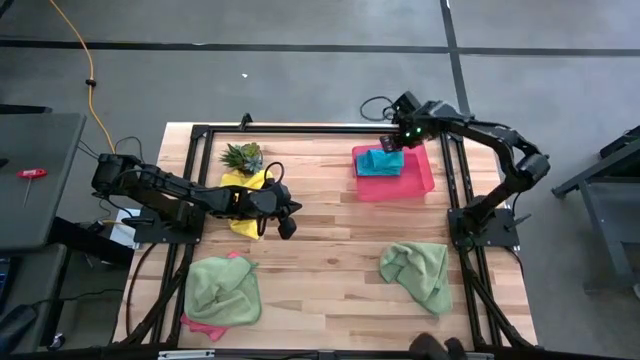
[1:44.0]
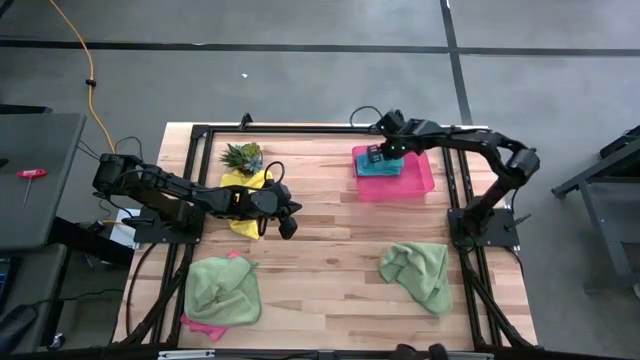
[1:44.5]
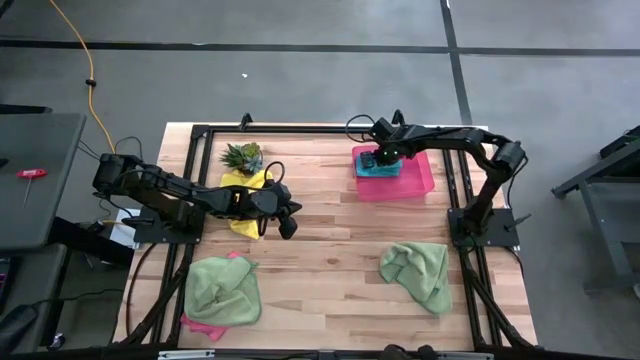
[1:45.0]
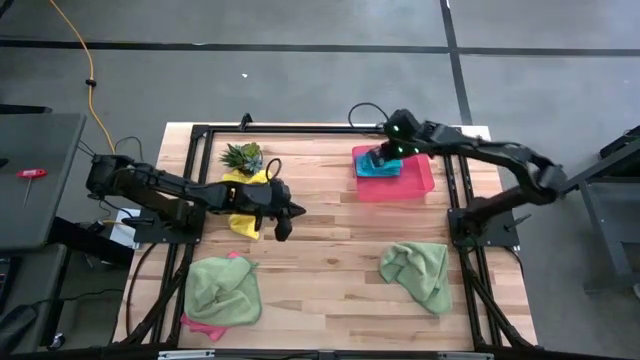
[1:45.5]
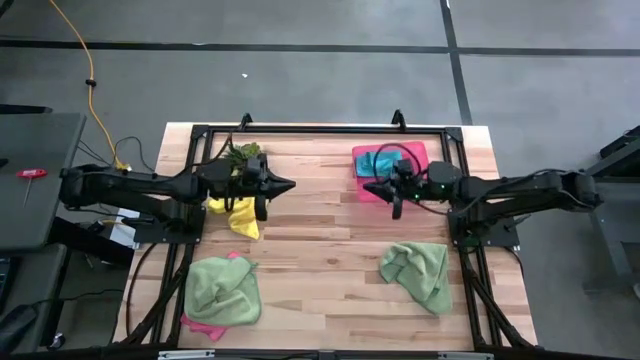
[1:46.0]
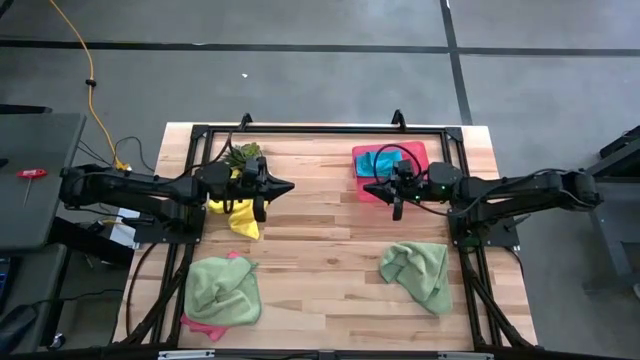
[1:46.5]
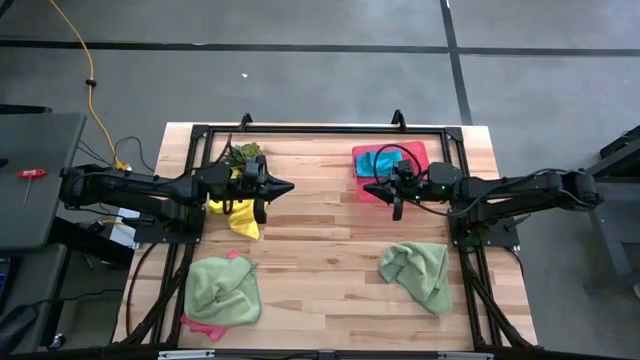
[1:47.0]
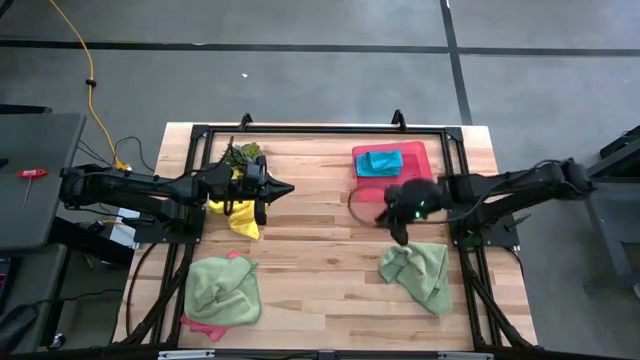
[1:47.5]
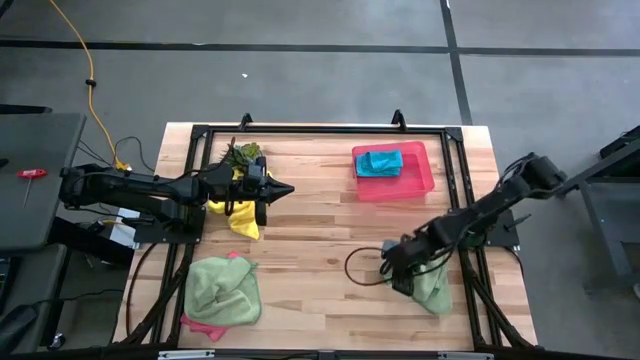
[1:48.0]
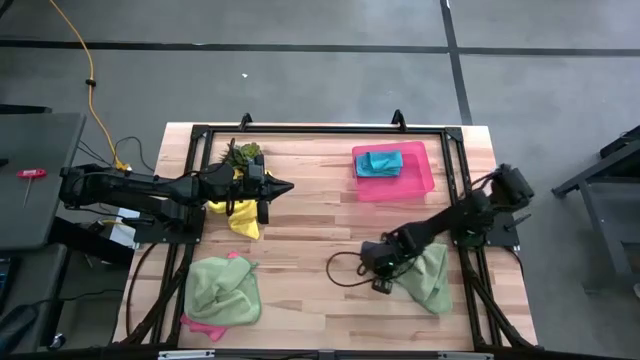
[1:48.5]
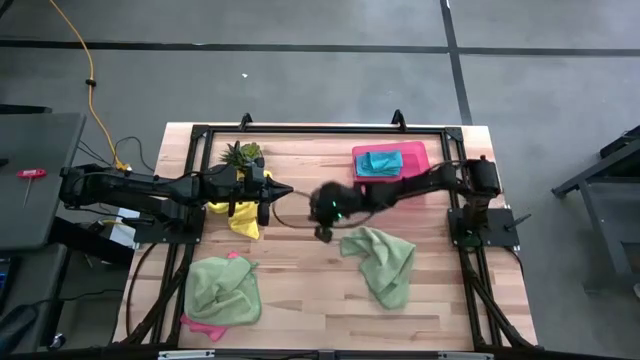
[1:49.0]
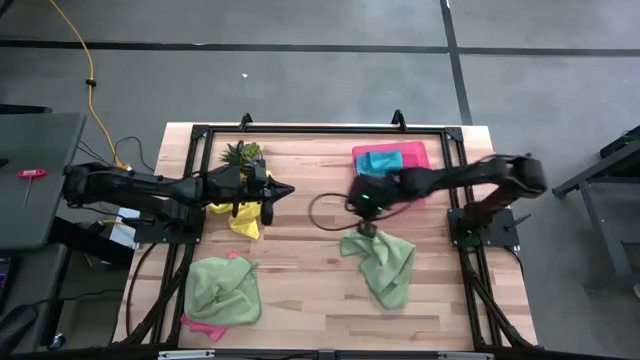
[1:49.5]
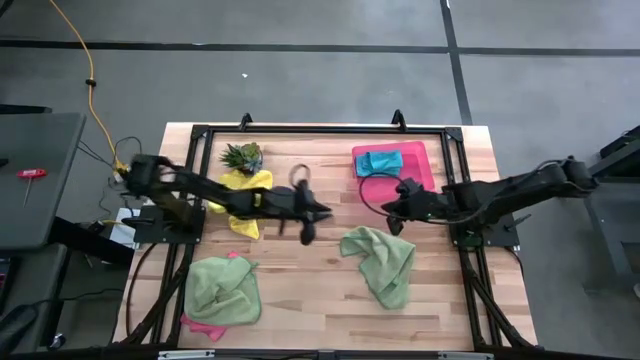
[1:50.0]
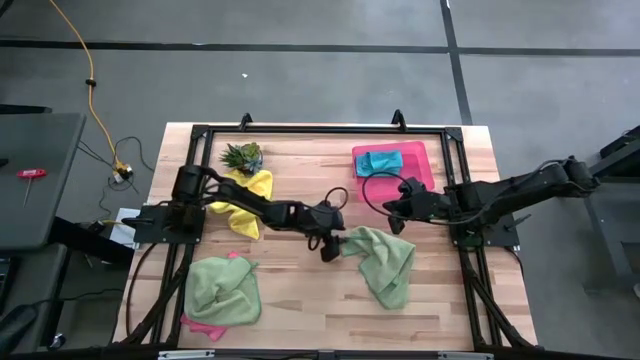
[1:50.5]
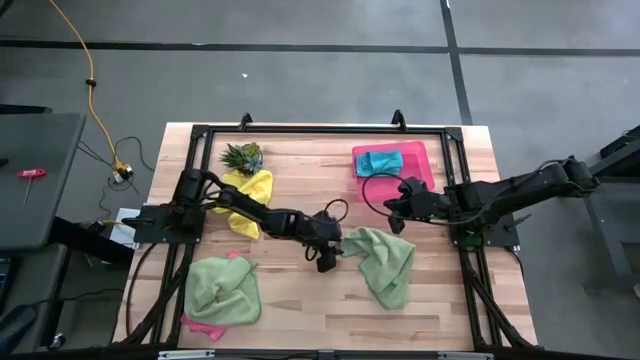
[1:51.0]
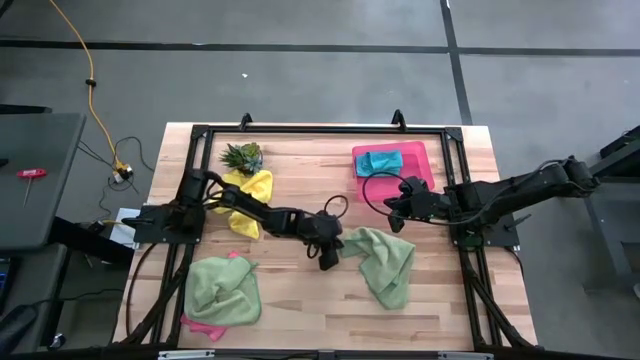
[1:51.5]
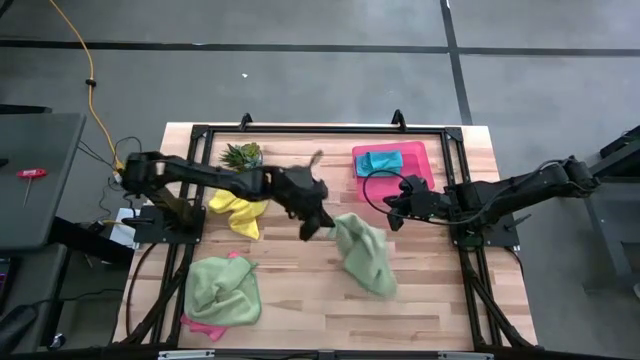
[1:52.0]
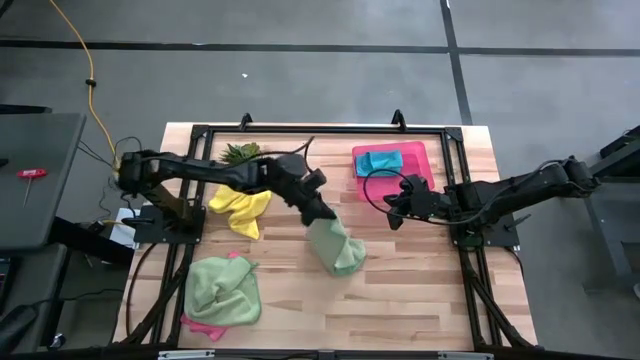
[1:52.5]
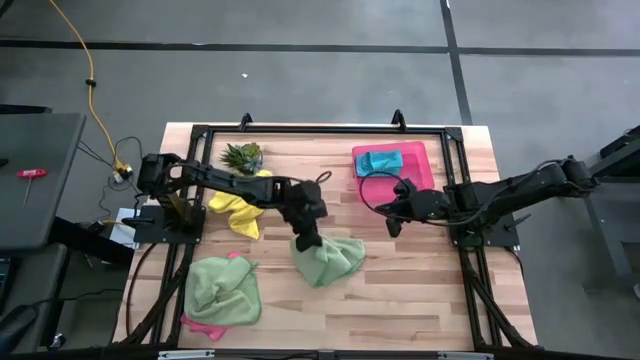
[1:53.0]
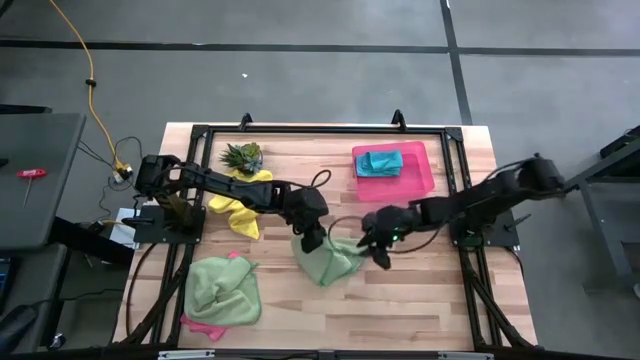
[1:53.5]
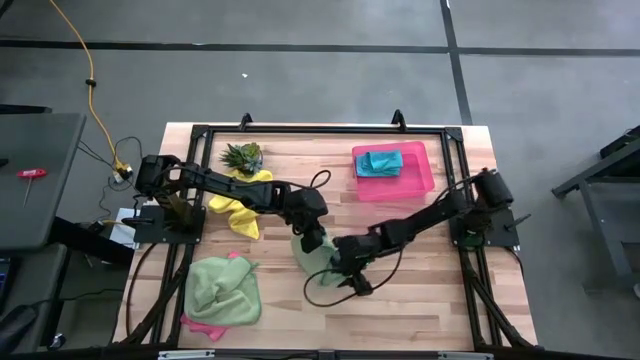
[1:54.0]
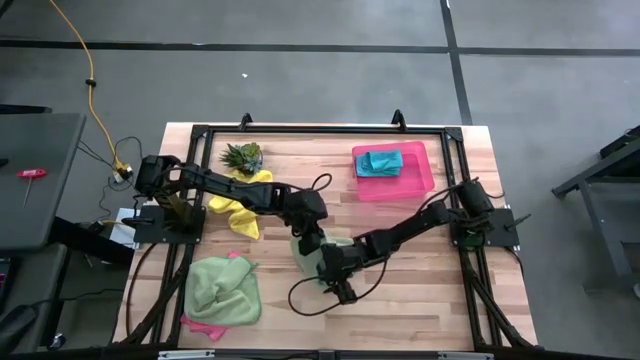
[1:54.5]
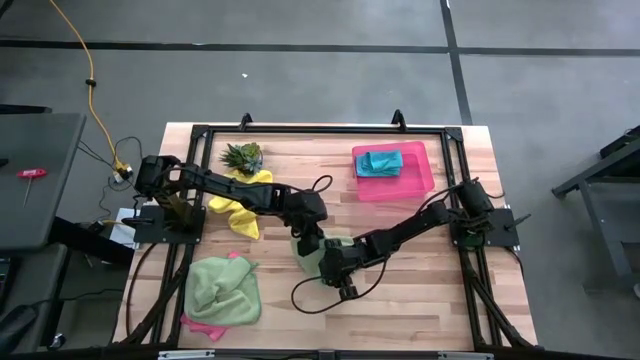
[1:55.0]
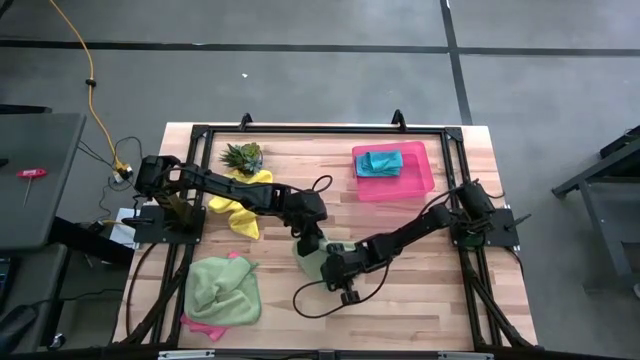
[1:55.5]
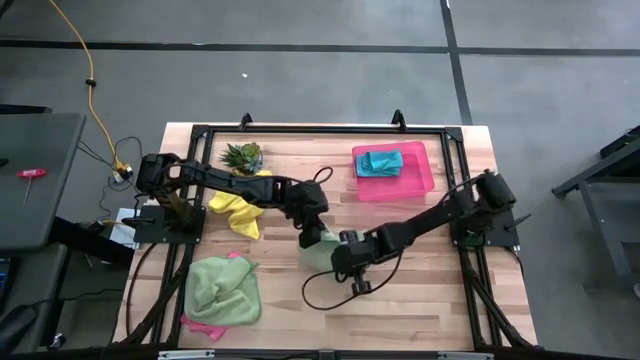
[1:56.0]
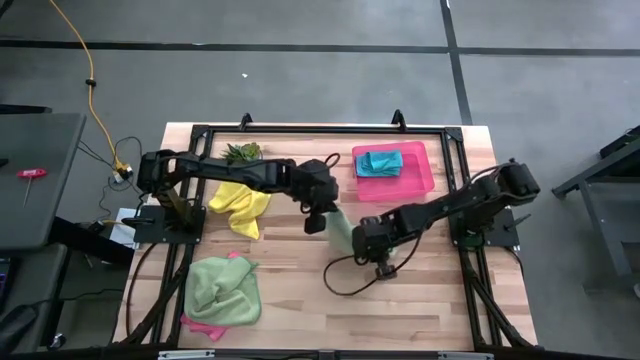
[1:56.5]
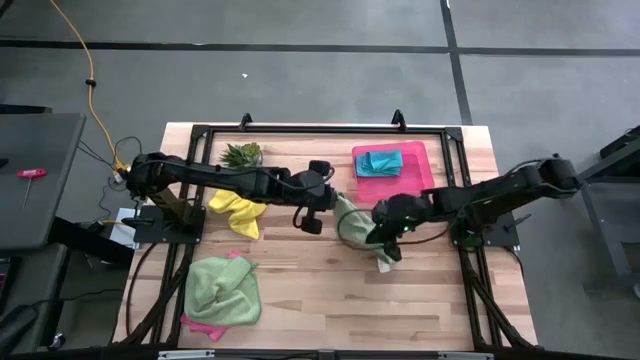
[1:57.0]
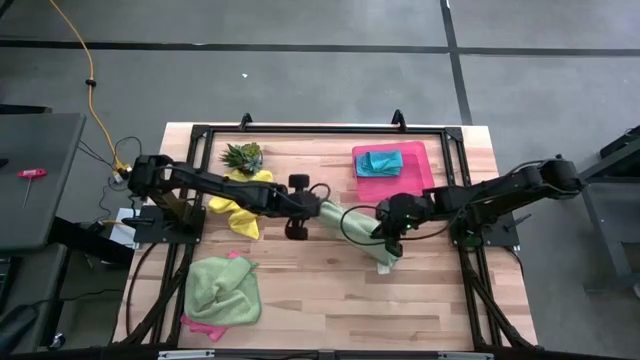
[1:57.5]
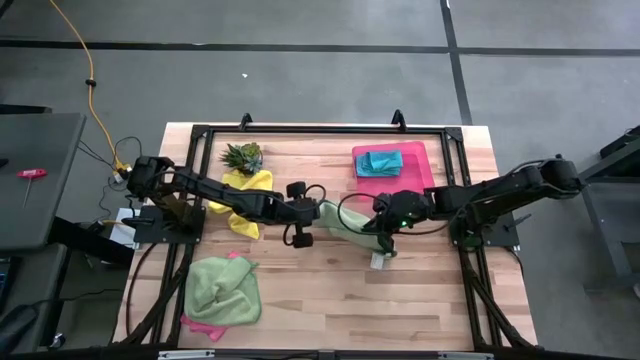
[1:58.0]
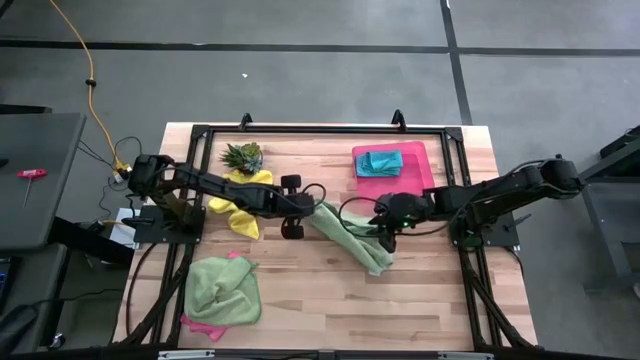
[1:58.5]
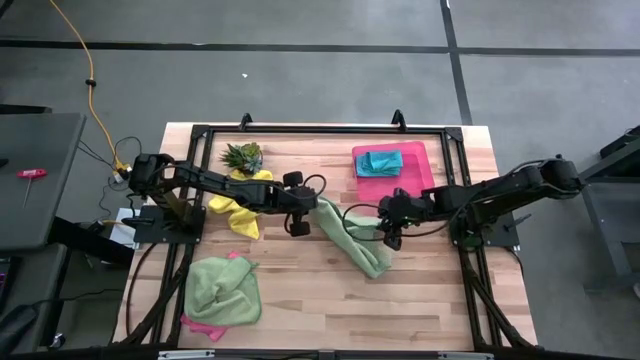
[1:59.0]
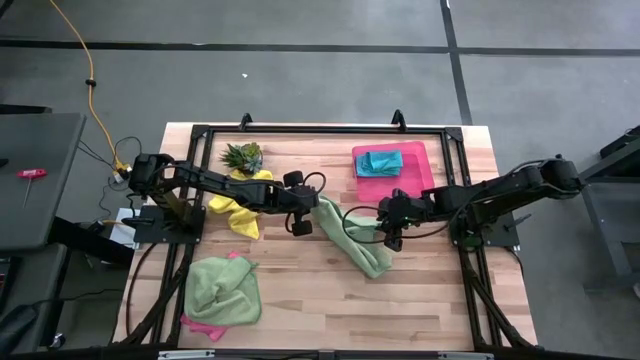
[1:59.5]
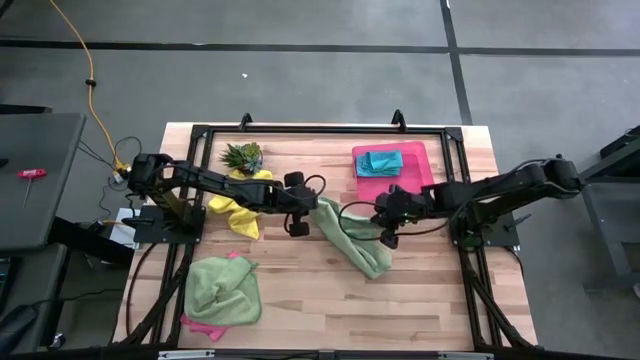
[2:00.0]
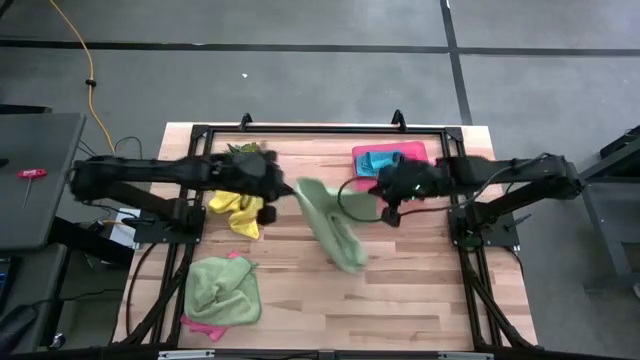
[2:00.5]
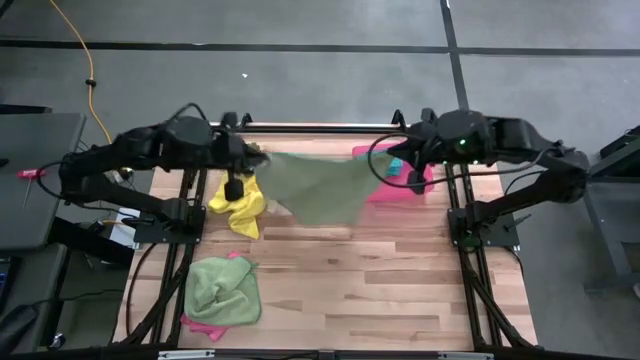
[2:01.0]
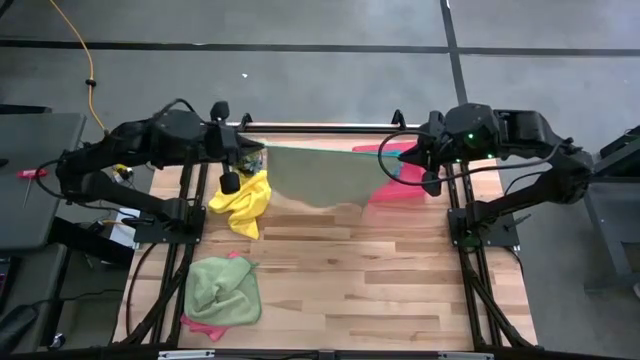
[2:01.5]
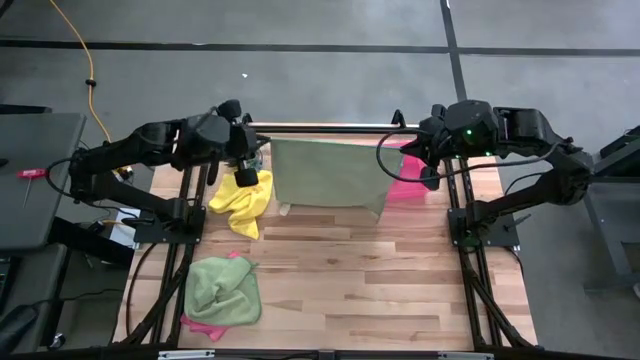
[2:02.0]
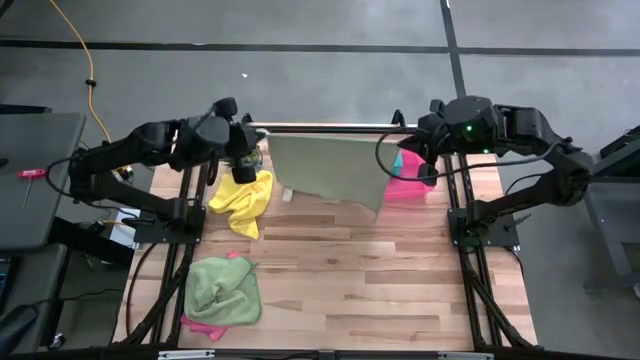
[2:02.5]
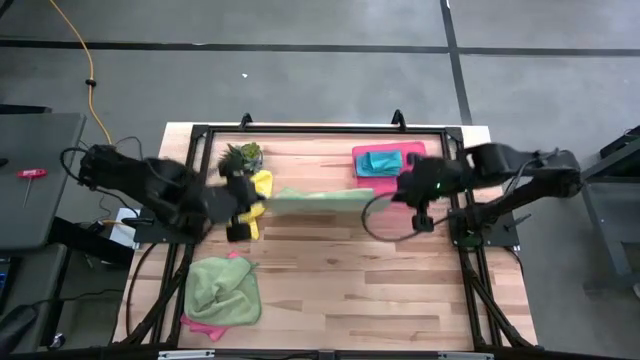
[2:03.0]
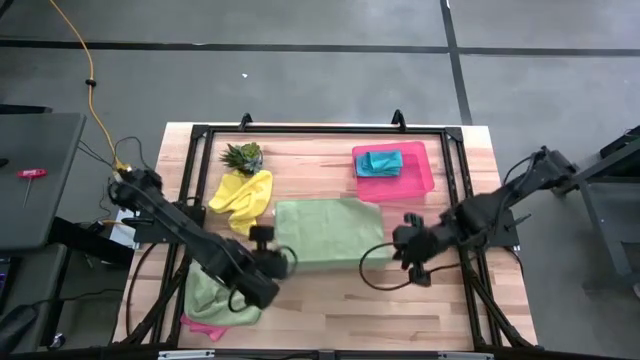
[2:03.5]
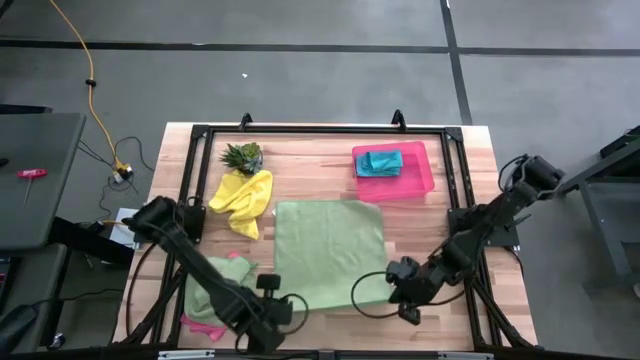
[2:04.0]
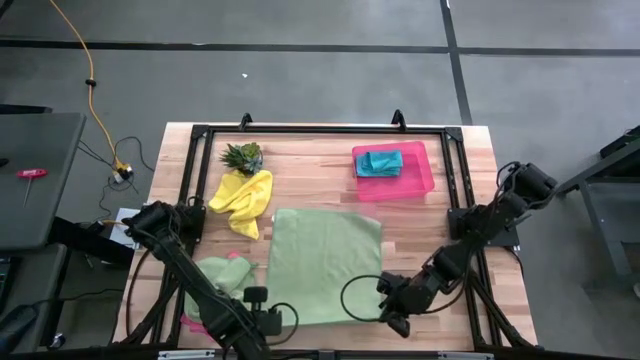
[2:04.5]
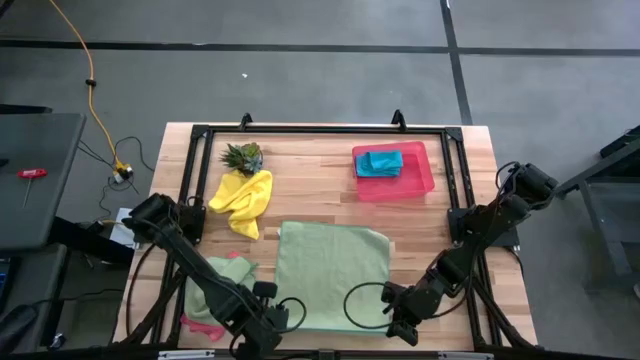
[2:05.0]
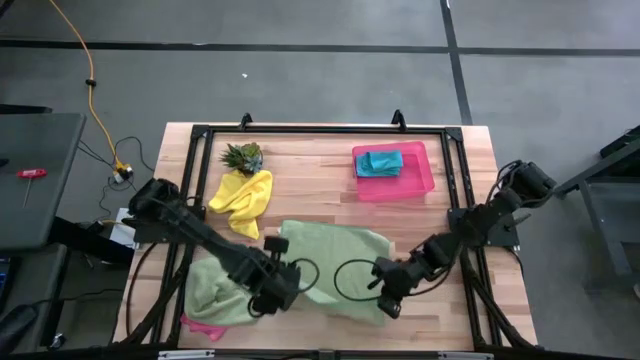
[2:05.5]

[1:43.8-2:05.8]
Task: Fold microfiber towels
Fold the right green microfiber cloth
